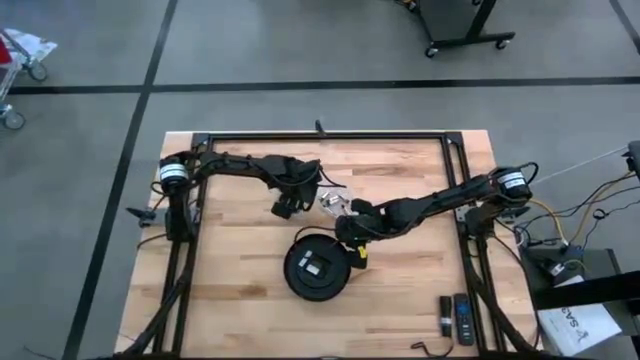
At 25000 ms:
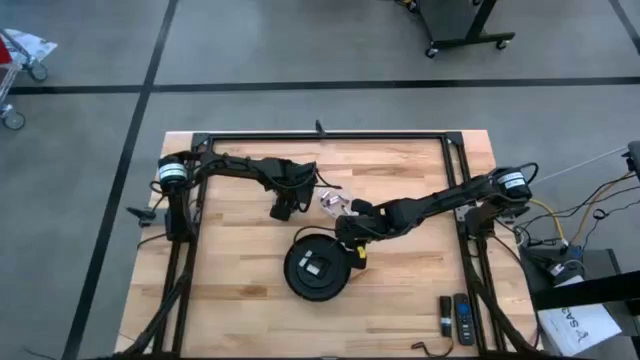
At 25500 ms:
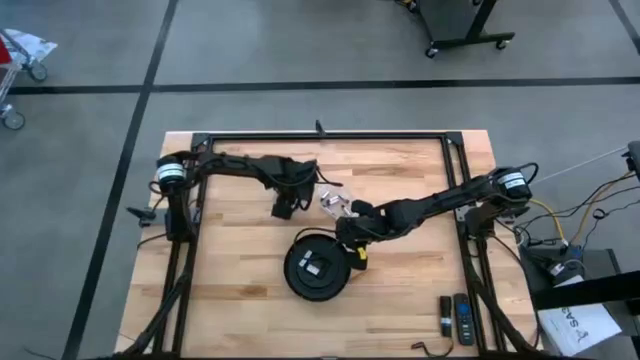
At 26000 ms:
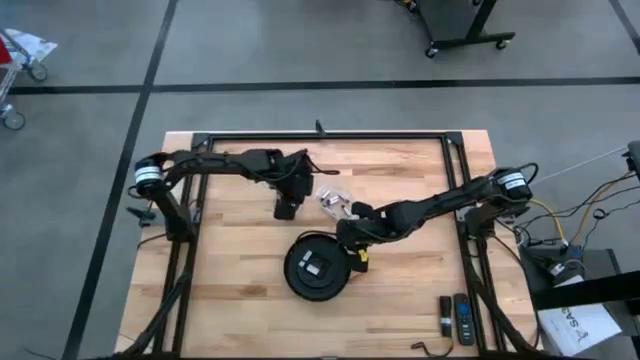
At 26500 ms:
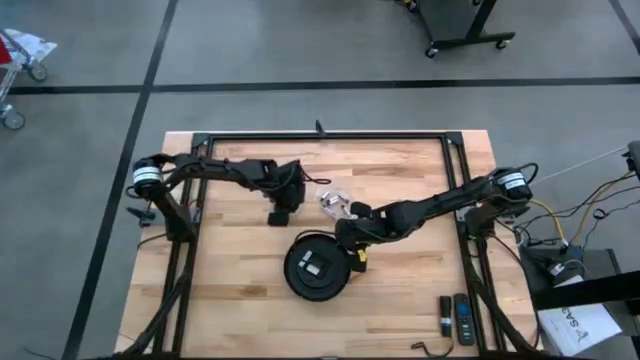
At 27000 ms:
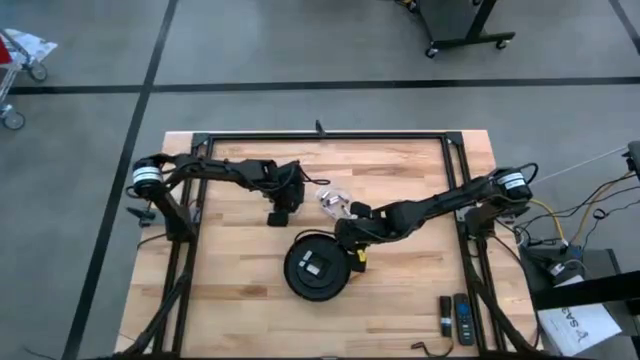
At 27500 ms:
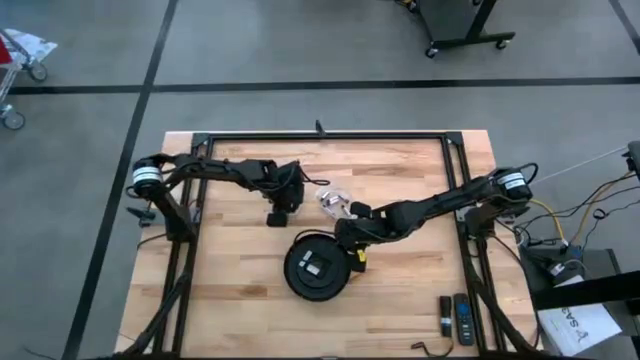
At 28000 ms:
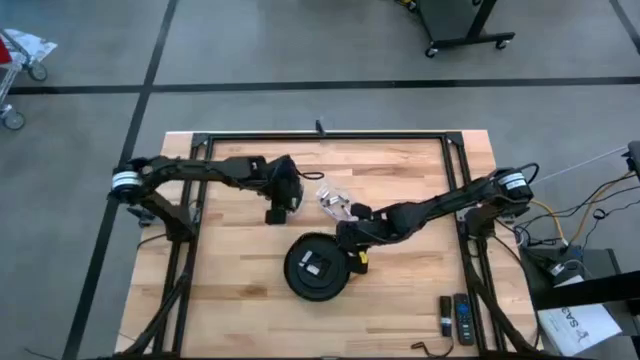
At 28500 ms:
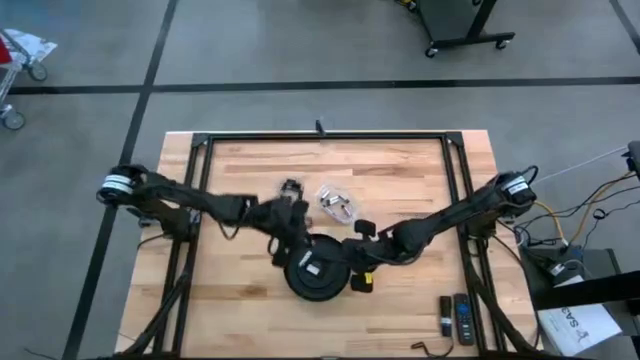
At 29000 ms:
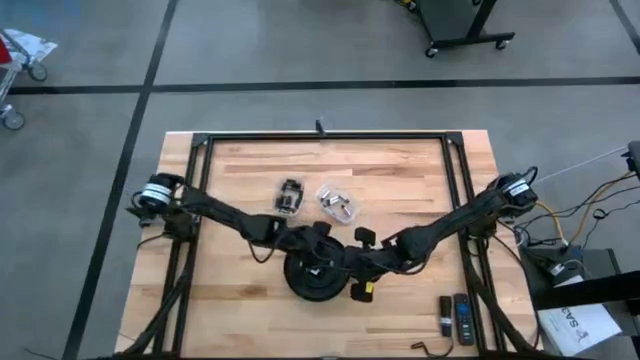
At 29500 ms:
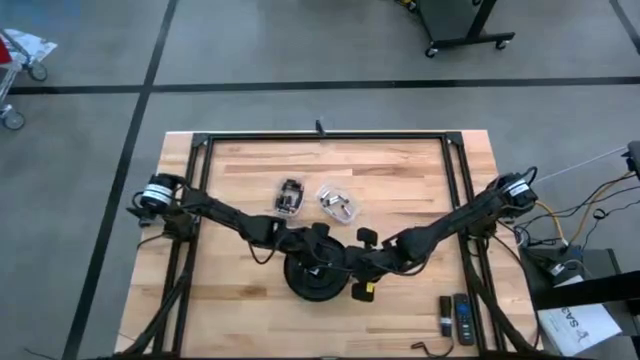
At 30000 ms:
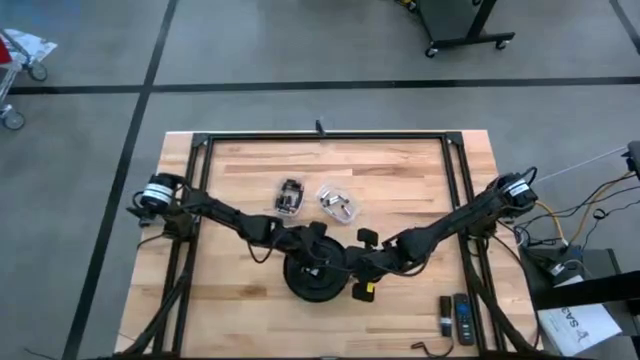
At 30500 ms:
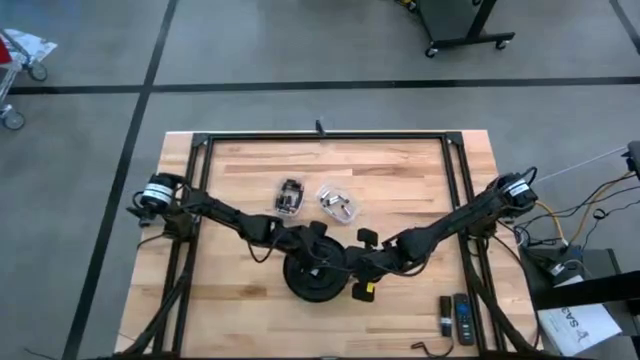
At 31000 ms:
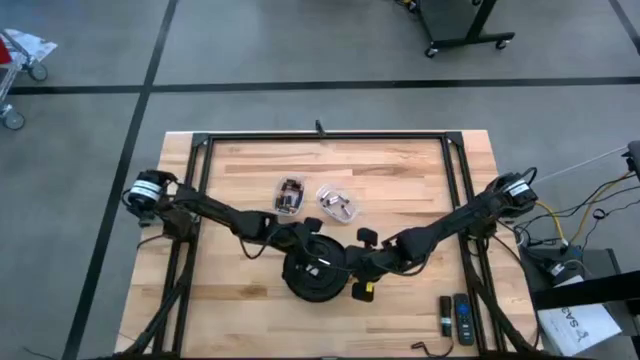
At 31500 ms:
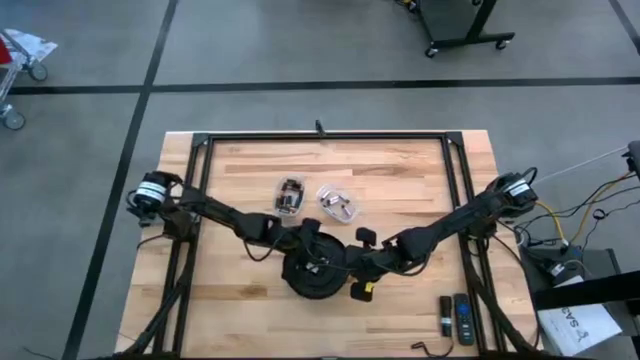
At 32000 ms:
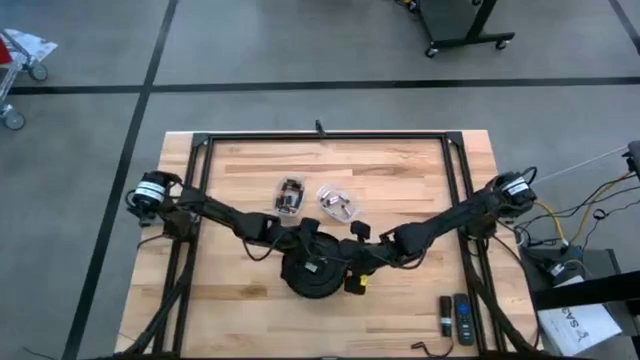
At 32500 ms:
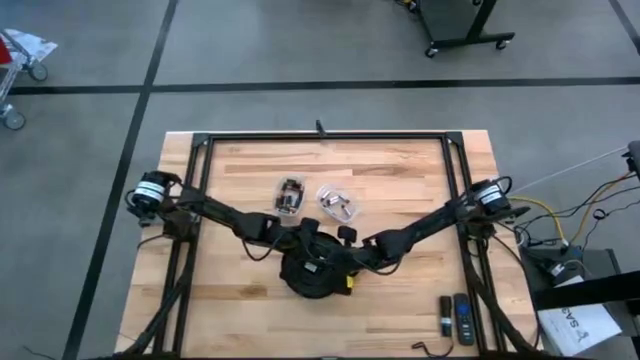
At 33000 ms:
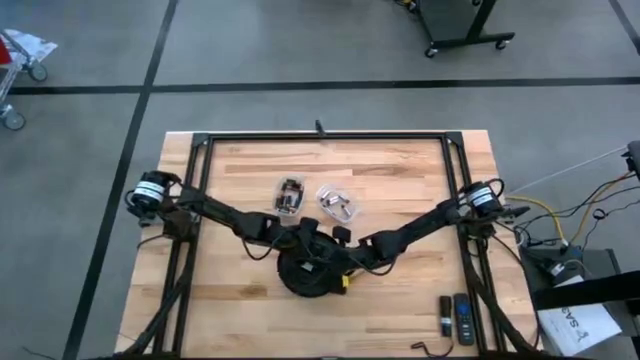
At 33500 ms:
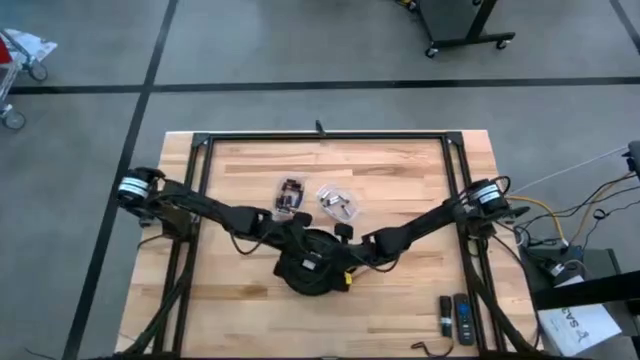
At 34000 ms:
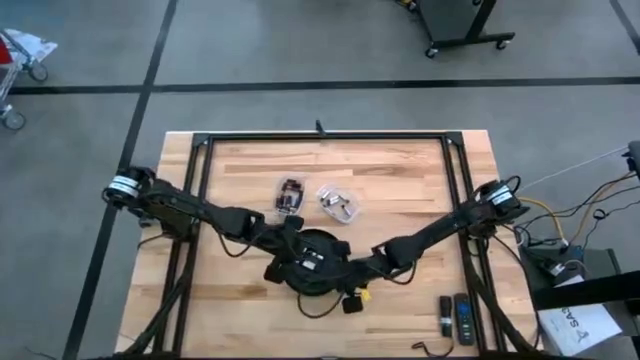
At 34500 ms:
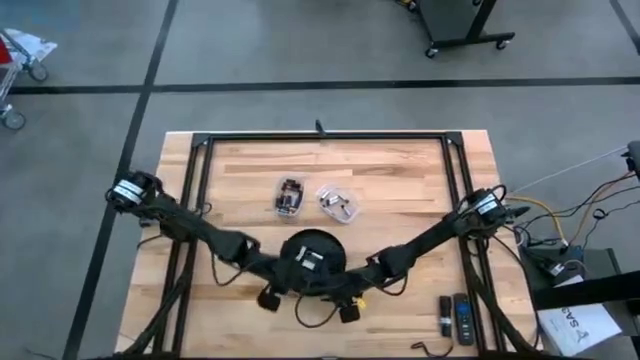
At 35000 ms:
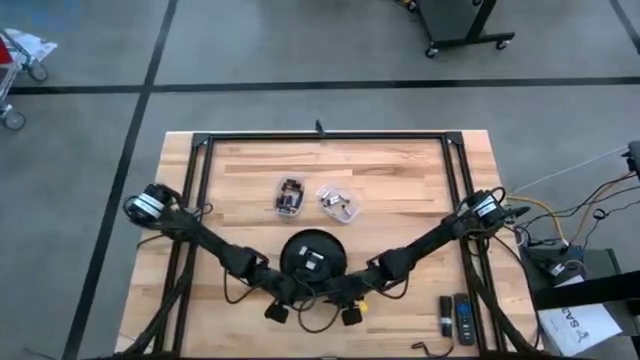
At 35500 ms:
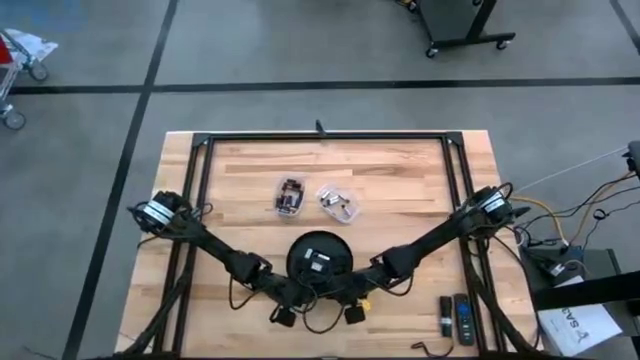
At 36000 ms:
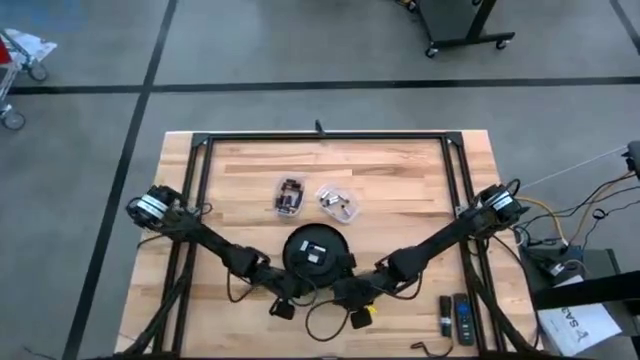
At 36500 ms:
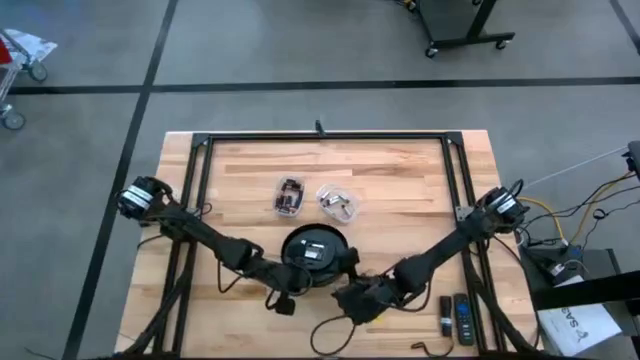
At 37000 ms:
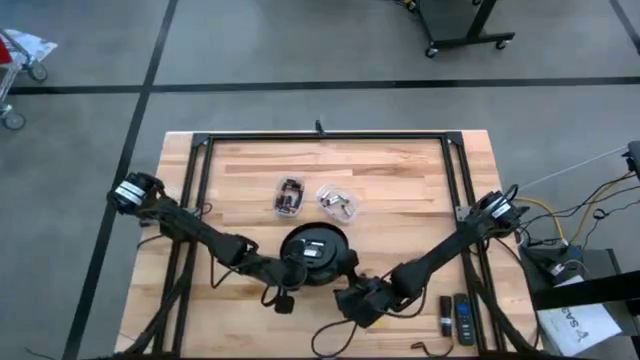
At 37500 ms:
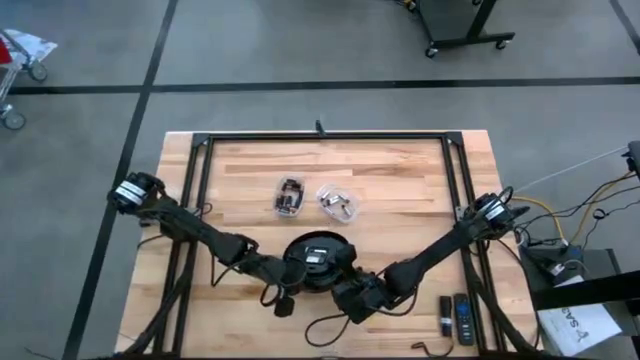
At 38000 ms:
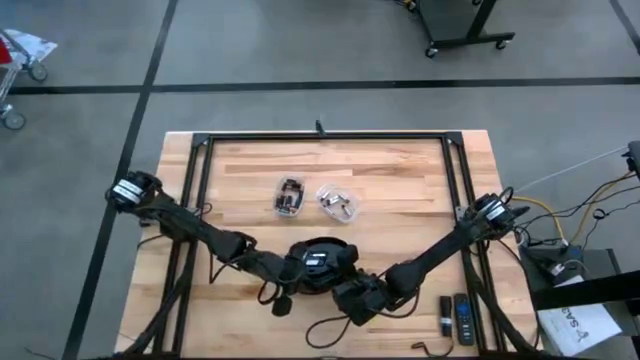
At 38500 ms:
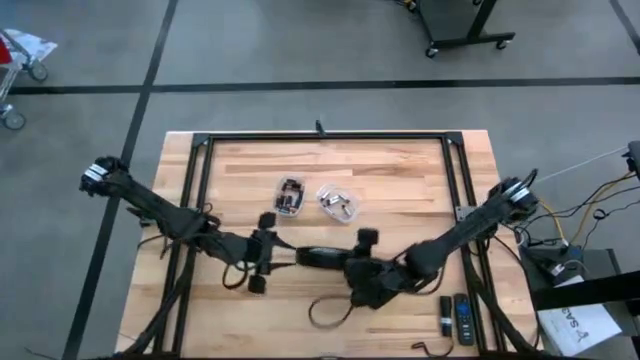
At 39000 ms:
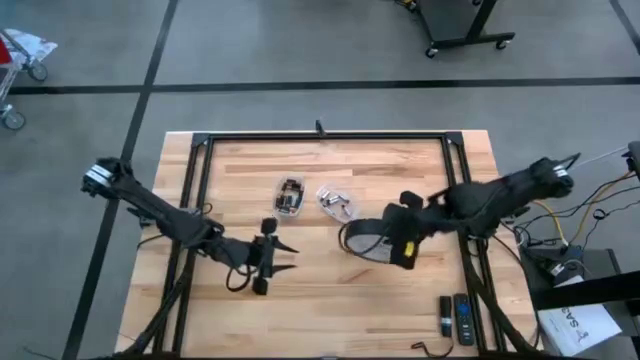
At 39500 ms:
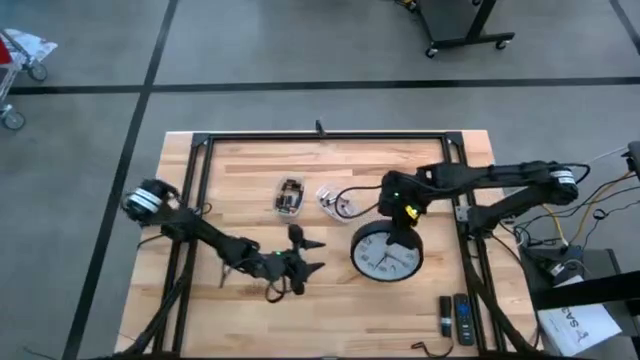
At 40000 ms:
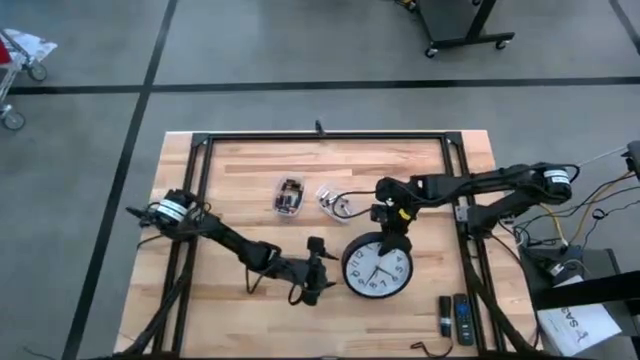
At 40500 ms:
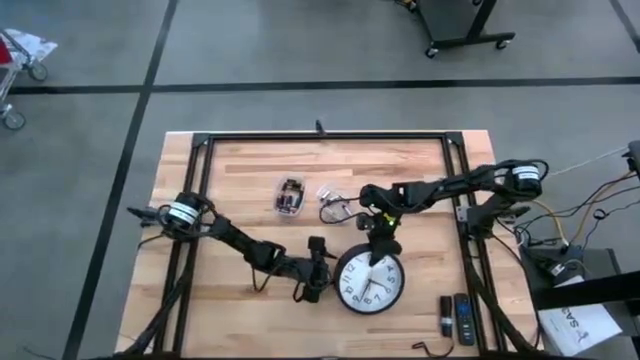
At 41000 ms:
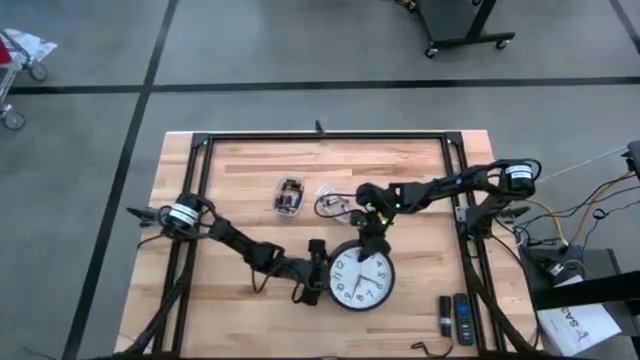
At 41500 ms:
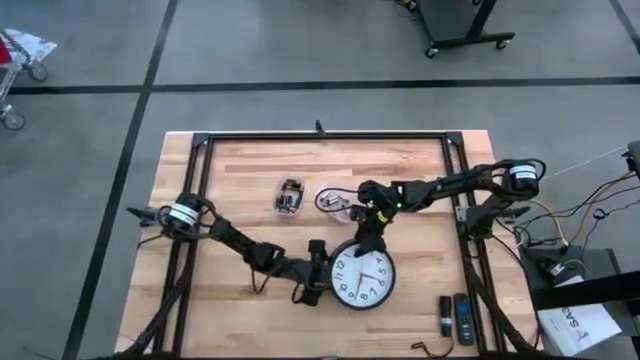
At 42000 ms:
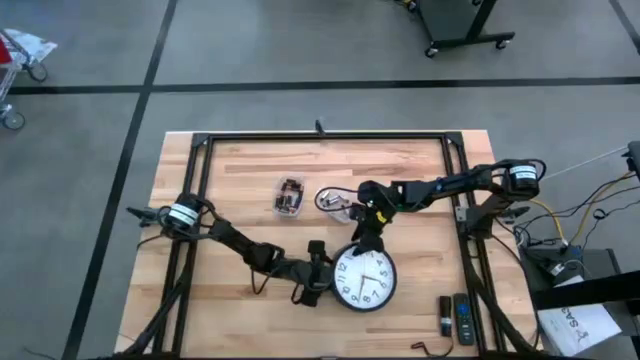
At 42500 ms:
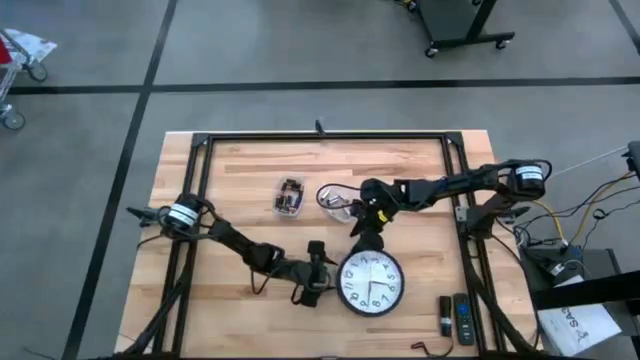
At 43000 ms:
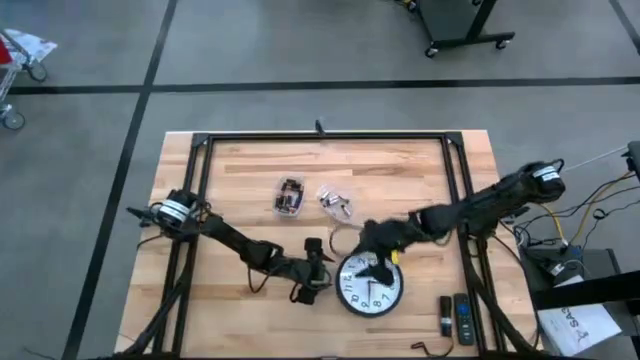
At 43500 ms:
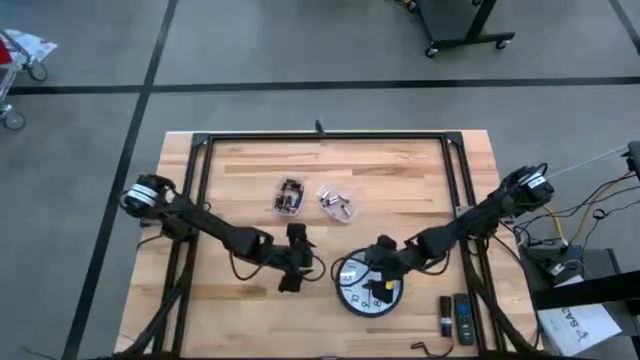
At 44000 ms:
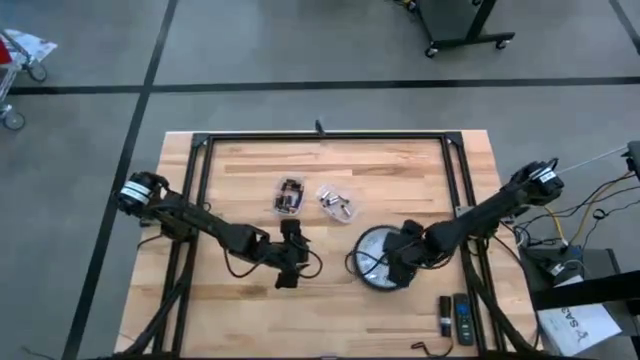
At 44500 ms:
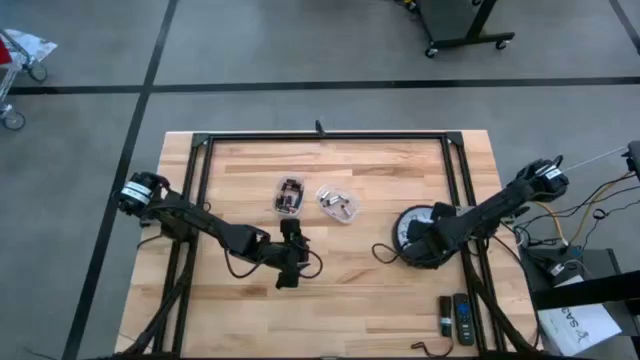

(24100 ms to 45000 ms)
Task: Insert battery
Insert the silver battery into the clock's battery compartment
